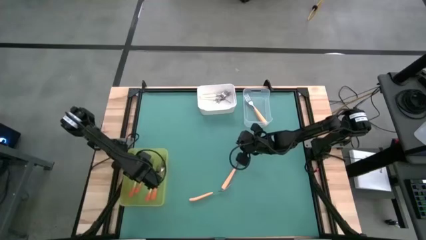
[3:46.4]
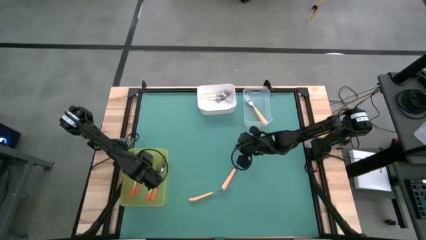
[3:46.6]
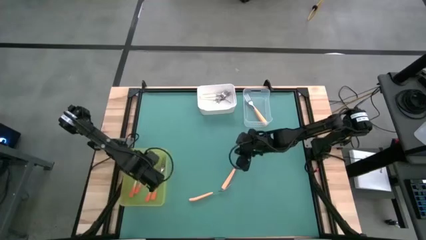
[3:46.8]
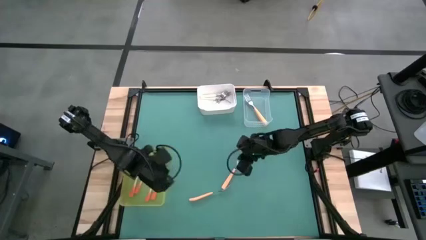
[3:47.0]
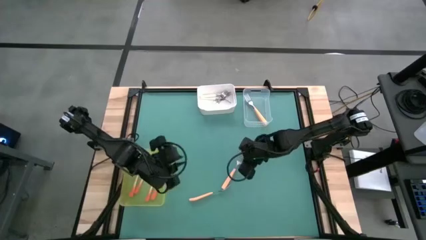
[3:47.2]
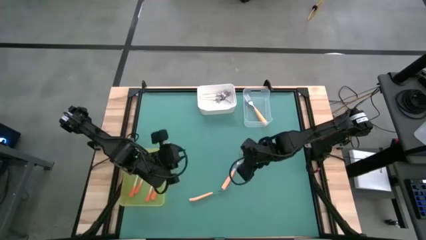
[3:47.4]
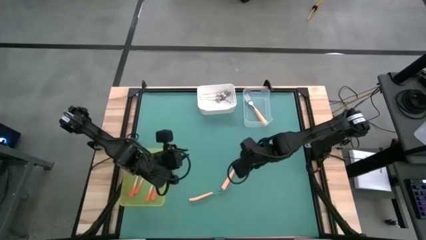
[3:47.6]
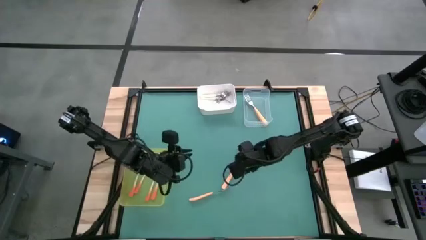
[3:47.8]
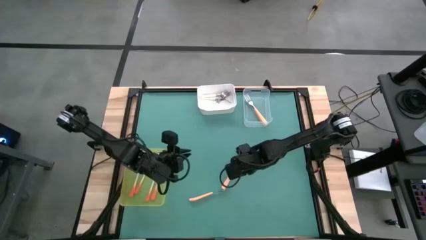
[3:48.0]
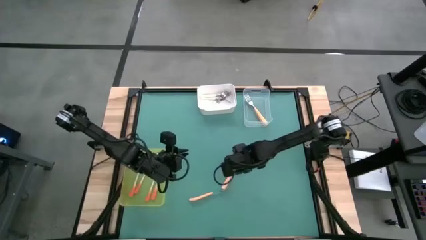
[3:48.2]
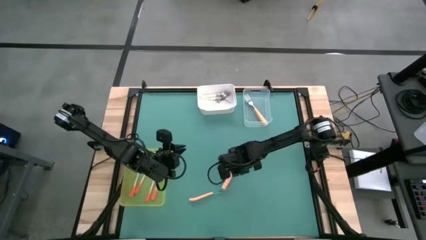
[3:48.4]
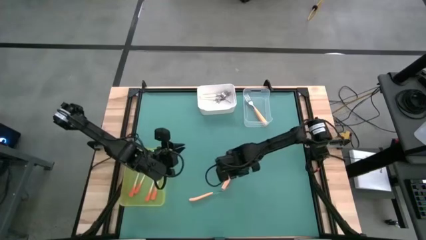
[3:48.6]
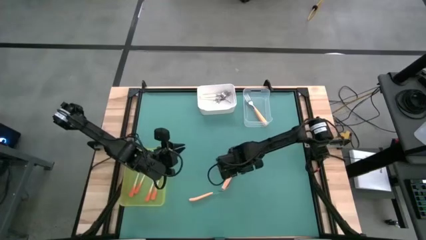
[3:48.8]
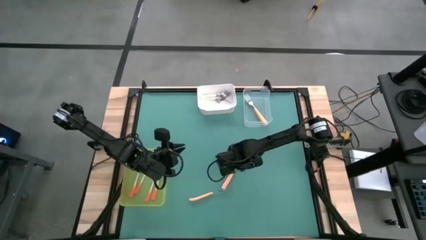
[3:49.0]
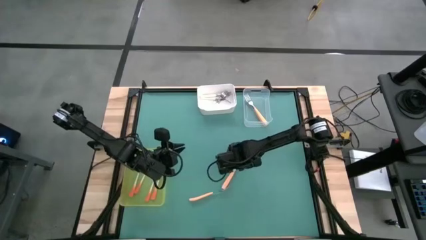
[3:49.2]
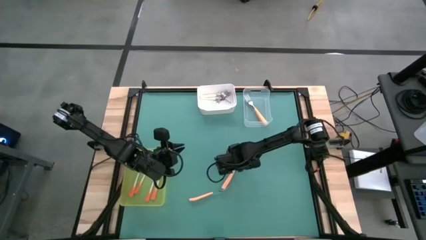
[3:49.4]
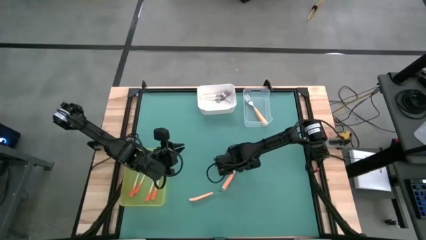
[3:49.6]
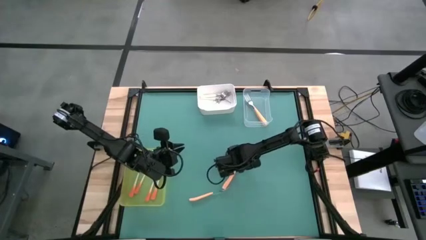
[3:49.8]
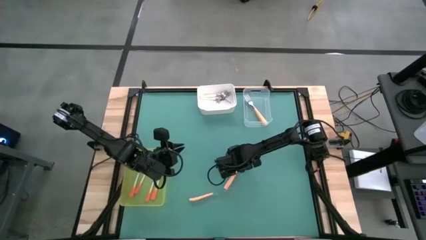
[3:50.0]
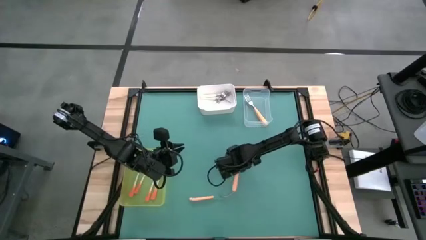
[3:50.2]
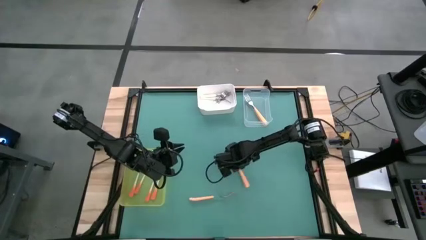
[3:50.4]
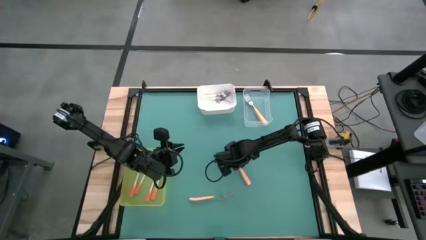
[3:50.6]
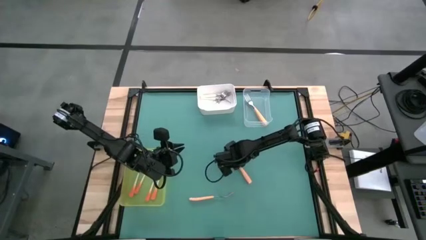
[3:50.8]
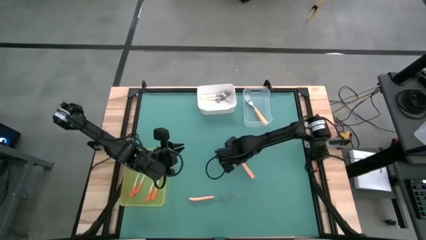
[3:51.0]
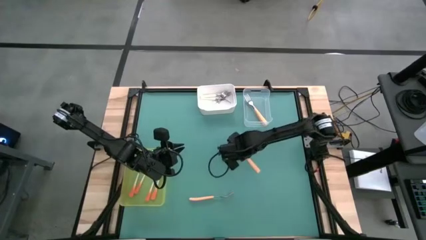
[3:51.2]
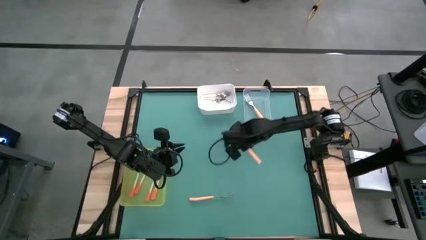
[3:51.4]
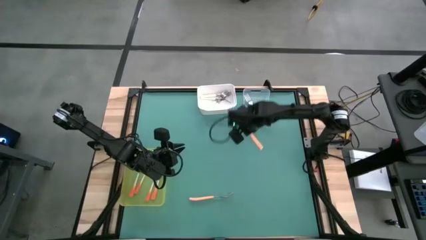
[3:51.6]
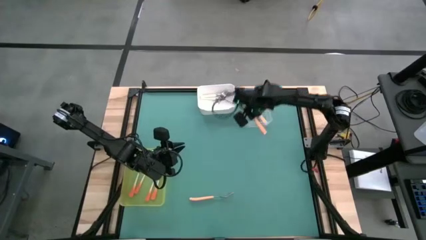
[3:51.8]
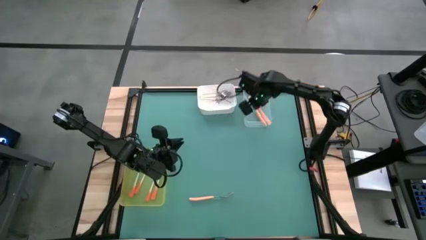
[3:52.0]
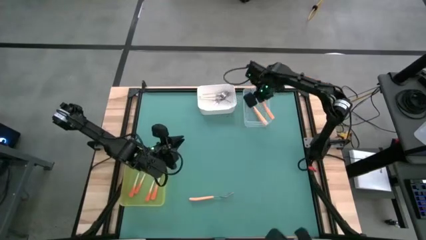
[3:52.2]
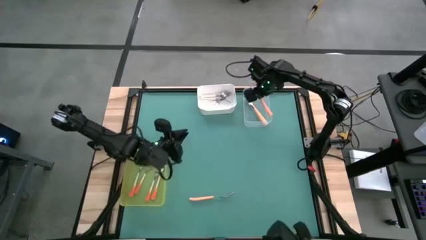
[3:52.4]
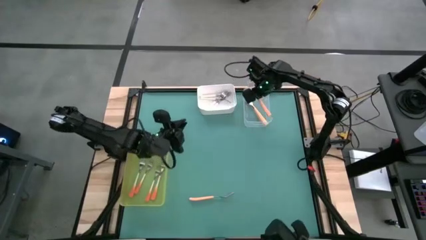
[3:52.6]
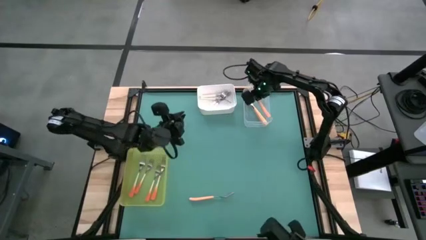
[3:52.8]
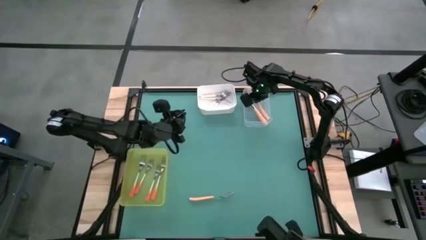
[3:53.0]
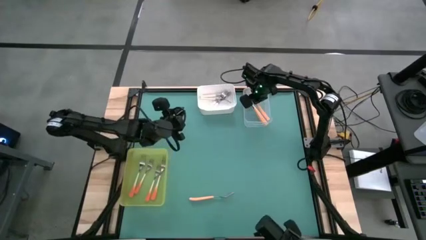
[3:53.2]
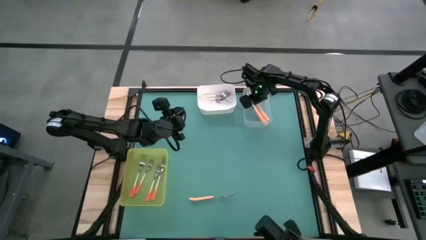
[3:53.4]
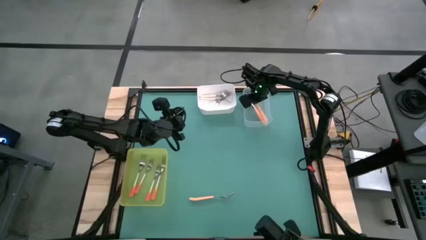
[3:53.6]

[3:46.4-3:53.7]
Task: Sort silverware by color (type)
Put the light orange fork into the transparent bin

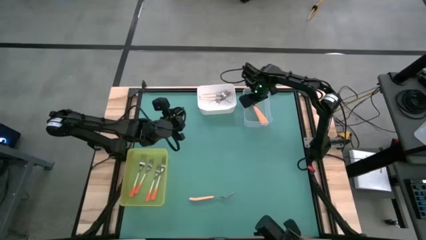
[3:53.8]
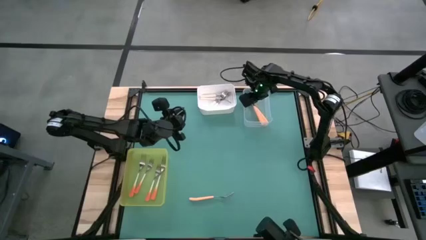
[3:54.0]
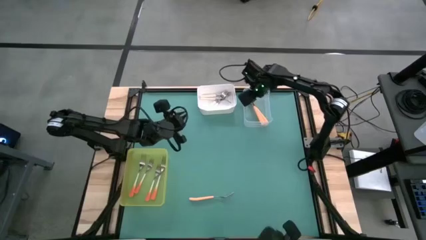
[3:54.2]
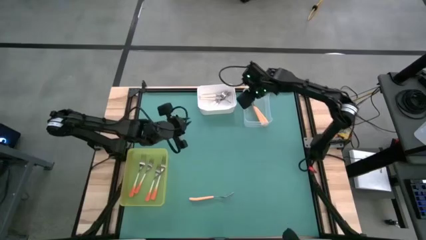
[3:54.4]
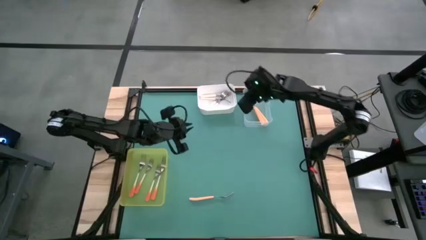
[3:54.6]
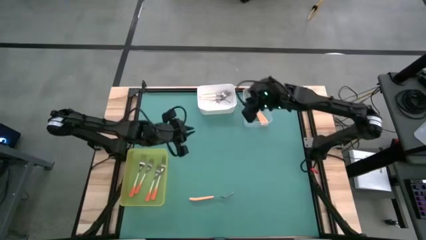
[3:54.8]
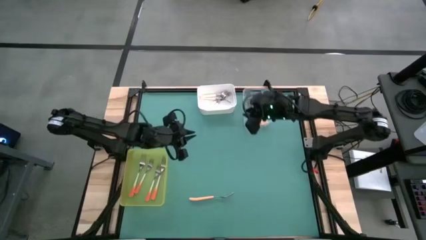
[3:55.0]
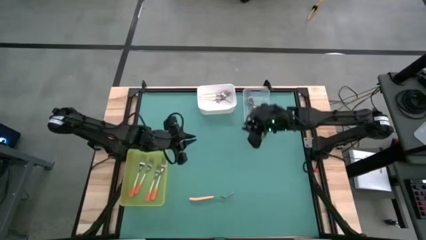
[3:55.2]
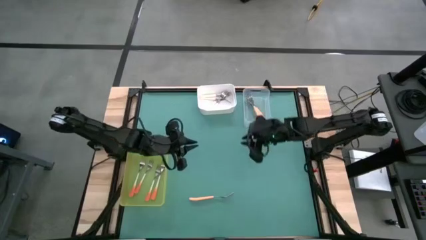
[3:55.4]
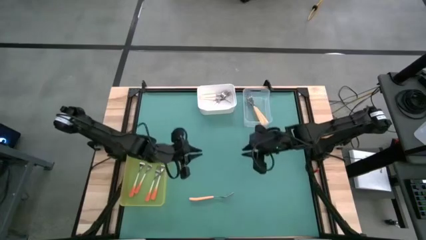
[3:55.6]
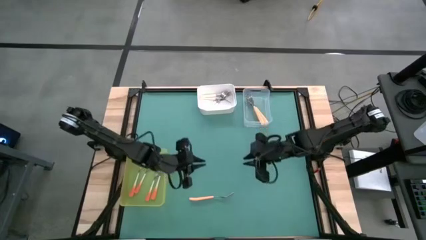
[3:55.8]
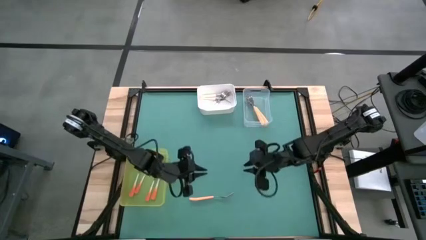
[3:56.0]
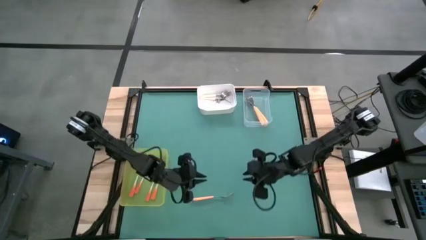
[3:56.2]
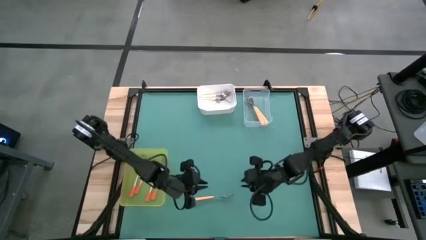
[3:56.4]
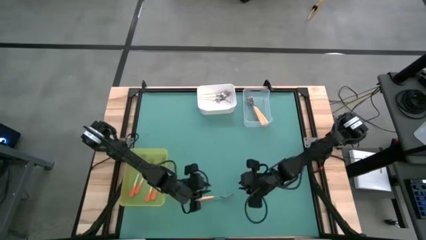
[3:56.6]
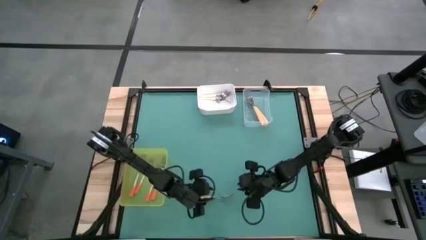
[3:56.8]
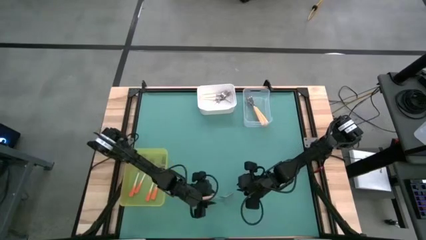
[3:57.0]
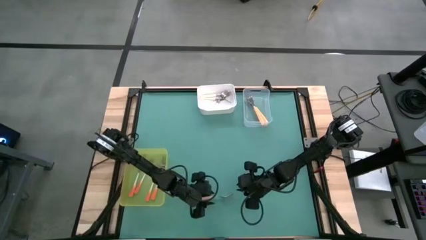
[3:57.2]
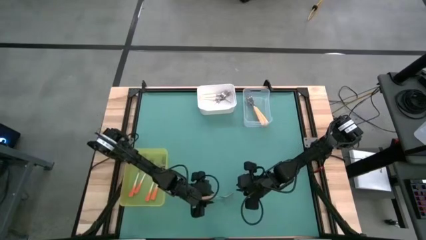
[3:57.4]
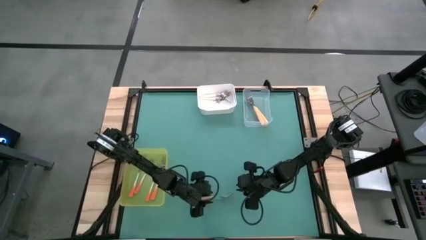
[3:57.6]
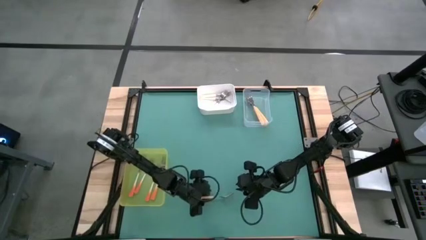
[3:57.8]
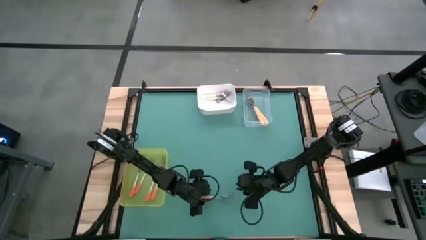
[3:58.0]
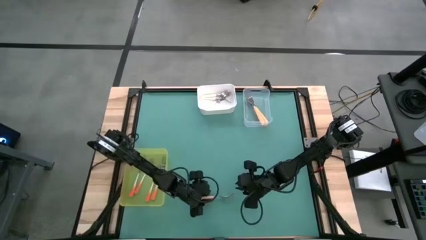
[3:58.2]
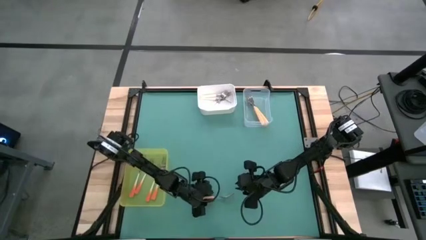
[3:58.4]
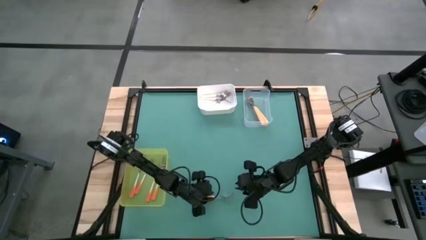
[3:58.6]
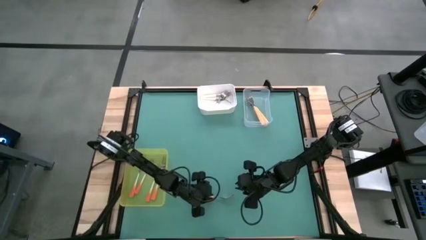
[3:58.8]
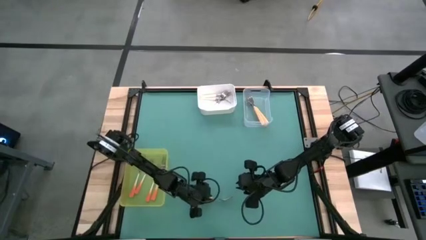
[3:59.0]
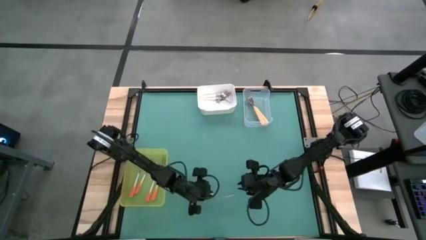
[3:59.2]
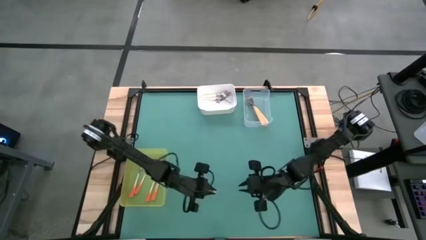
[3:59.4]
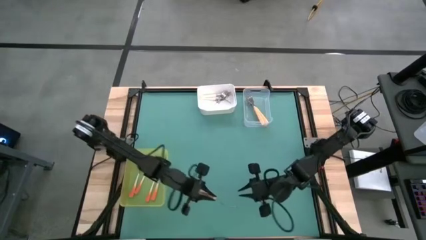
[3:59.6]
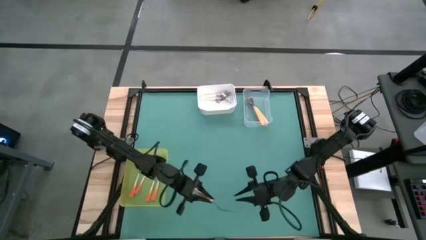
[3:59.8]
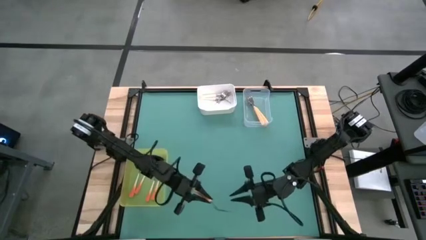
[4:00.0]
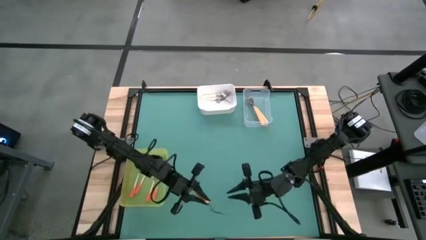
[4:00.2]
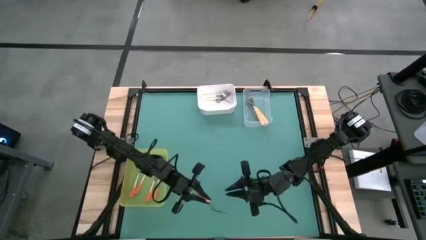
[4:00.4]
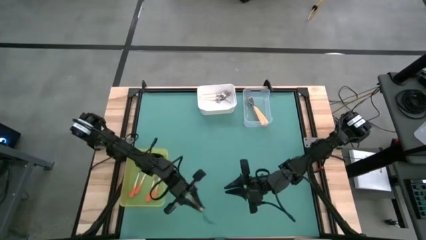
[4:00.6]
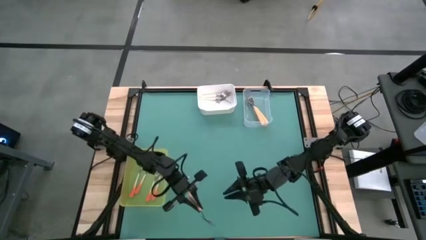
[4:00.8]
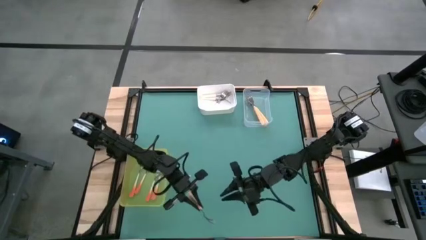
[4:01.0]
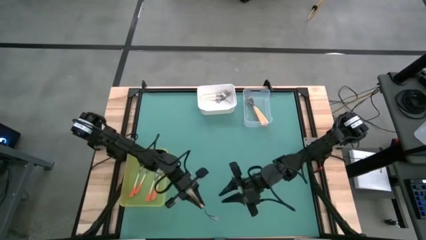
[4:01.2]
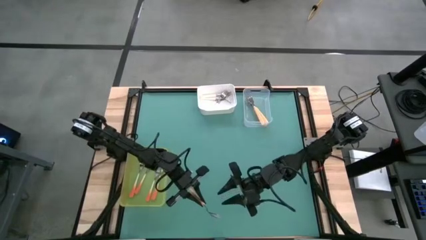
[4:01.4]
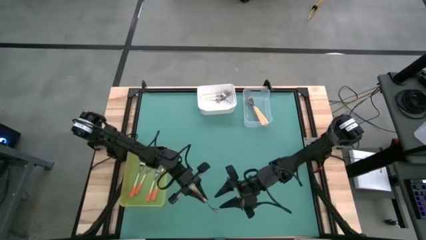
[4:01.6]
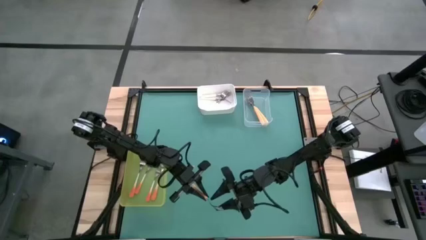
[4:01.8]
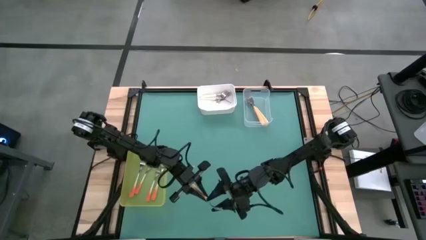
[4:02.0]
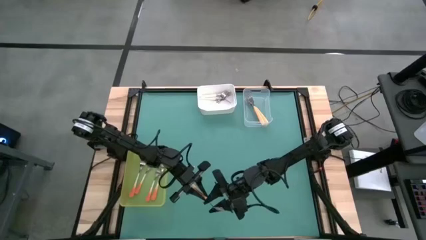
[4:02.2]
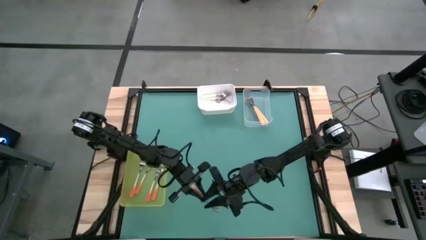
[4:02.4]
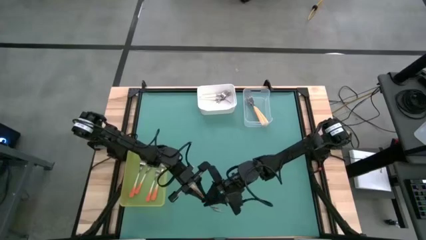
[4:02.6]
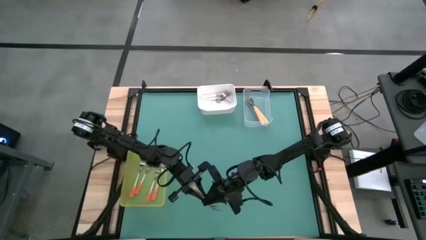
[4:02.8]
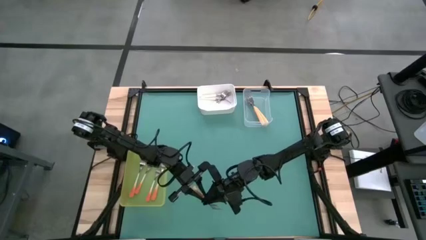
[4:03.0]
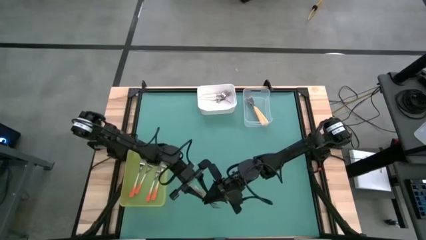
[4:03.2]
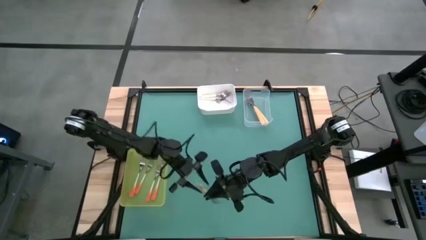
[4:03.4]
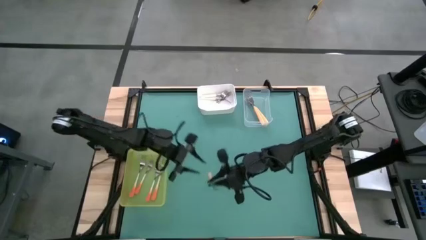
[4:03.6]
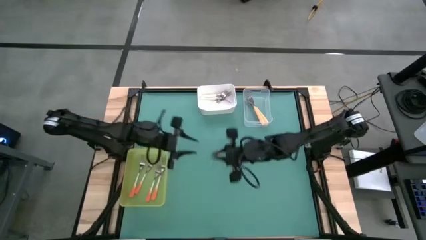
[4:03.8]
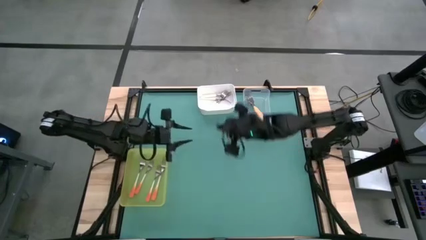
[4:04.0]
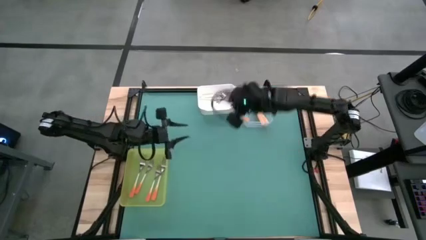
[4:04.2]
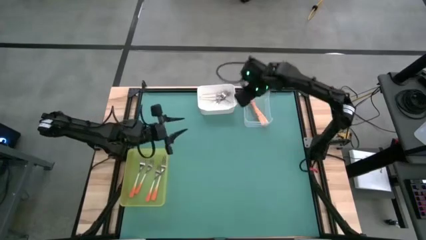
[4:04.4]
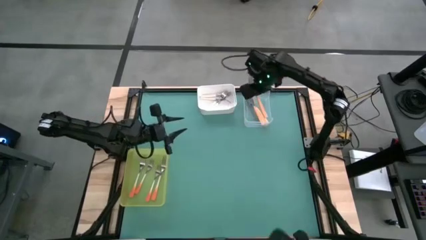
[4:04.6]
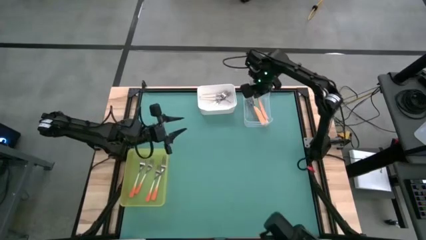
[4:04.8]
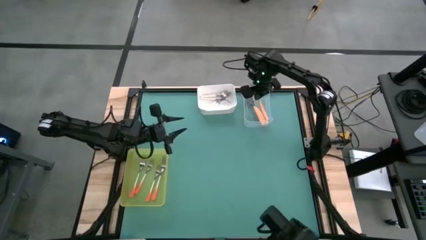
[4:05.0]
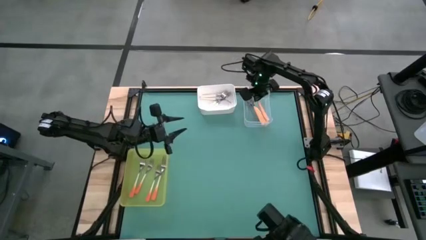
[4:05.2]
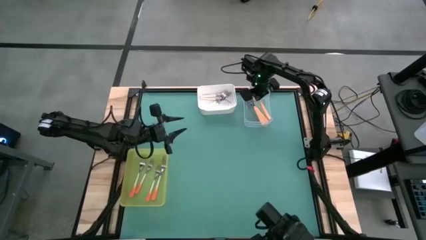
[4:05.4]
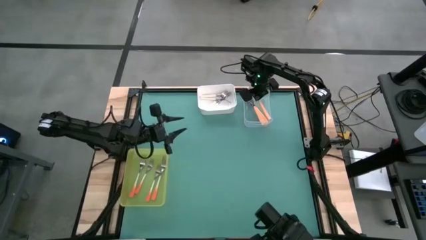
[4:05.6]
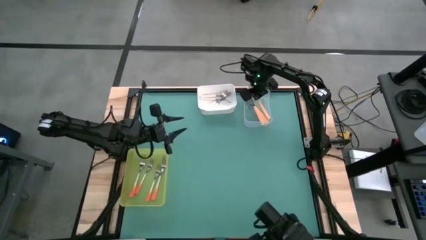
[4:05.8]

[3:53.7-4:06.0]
Put the light orange fork into the transparent bin
